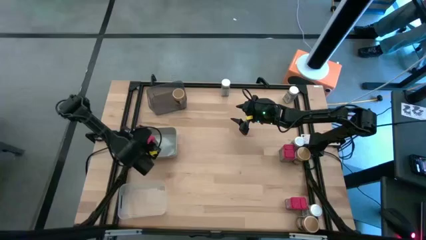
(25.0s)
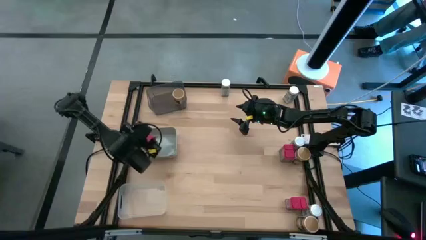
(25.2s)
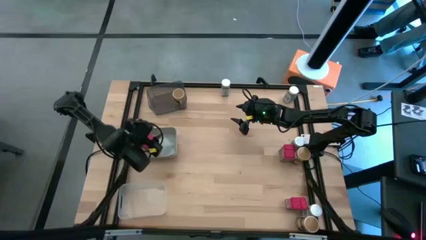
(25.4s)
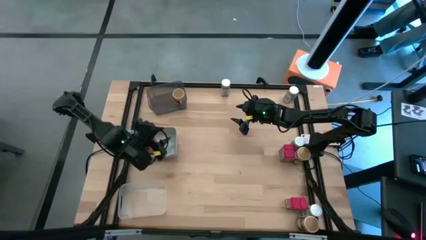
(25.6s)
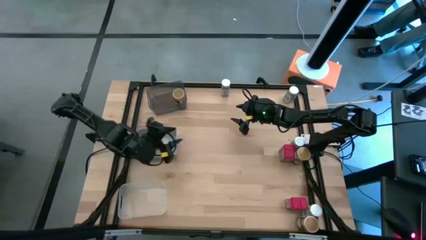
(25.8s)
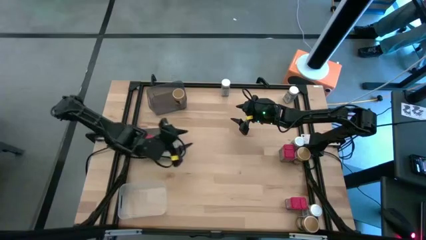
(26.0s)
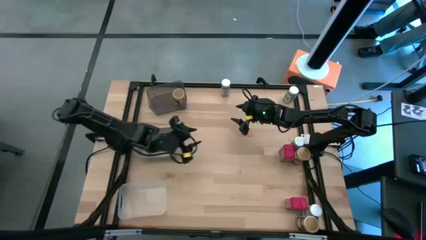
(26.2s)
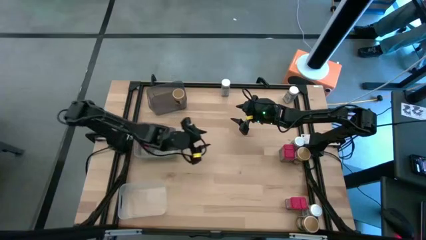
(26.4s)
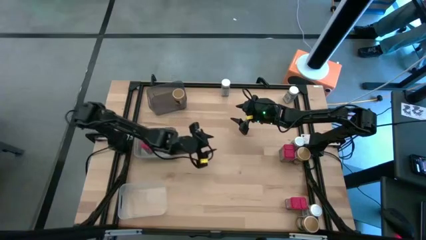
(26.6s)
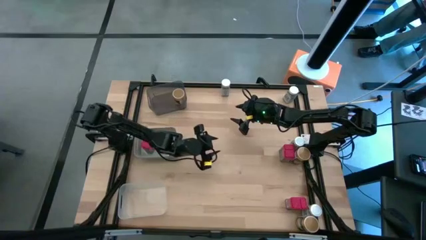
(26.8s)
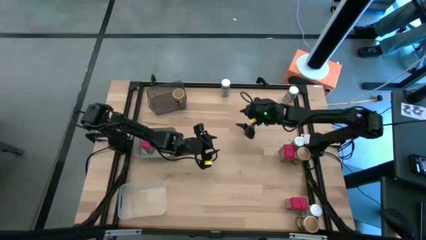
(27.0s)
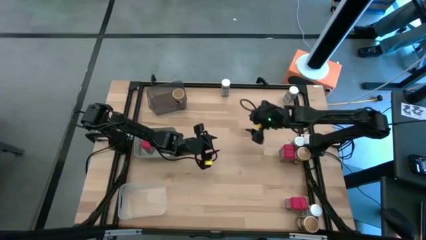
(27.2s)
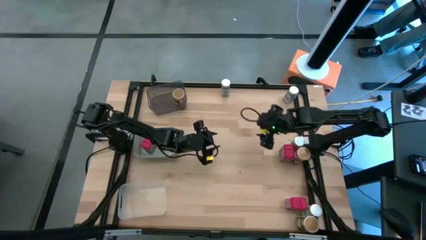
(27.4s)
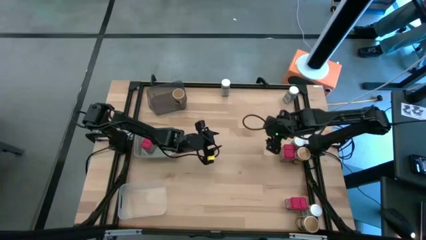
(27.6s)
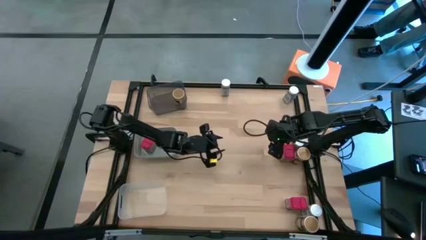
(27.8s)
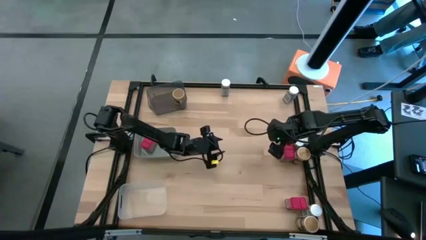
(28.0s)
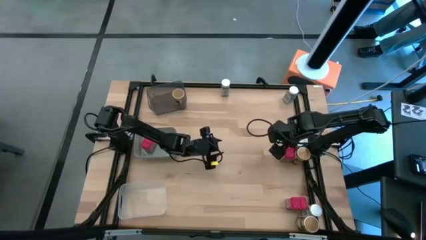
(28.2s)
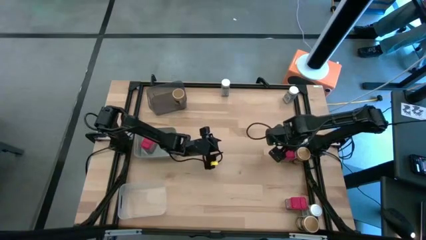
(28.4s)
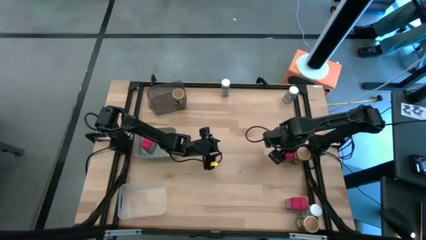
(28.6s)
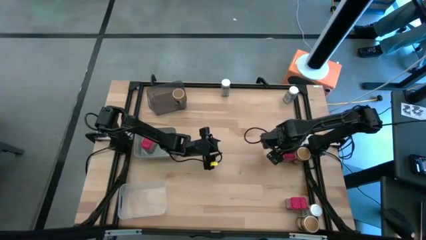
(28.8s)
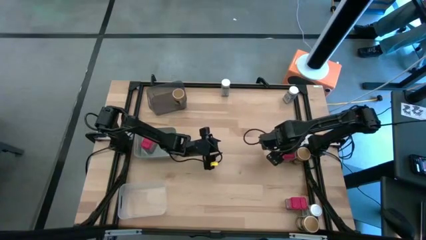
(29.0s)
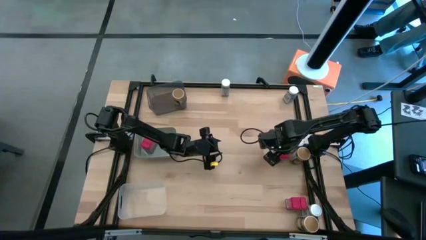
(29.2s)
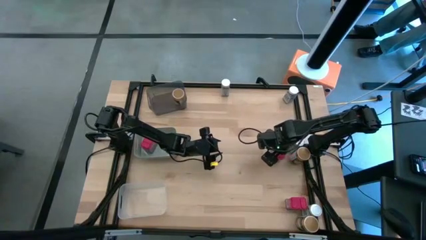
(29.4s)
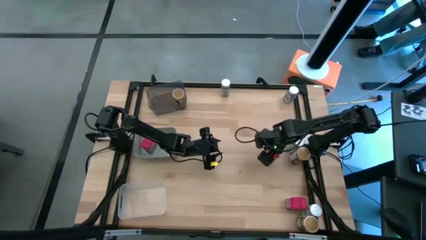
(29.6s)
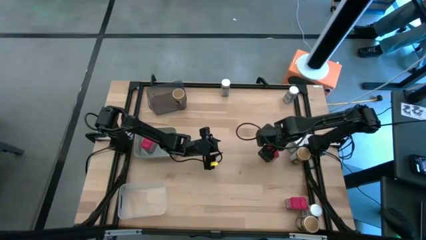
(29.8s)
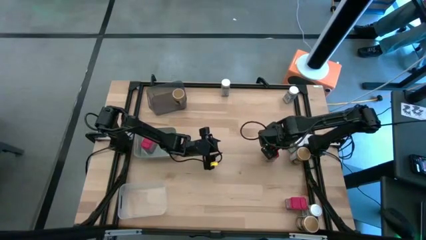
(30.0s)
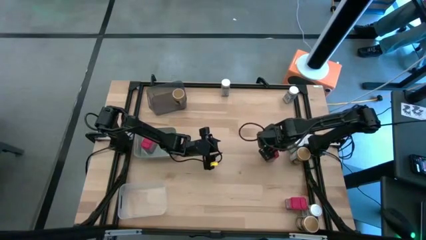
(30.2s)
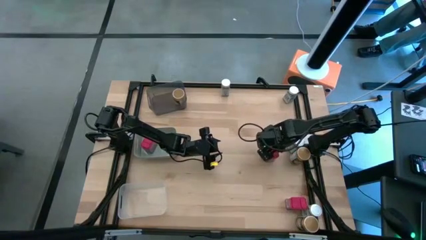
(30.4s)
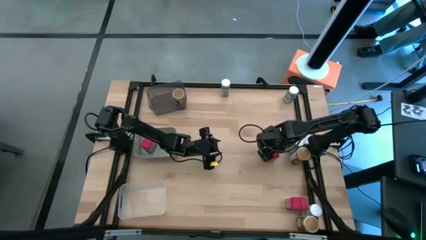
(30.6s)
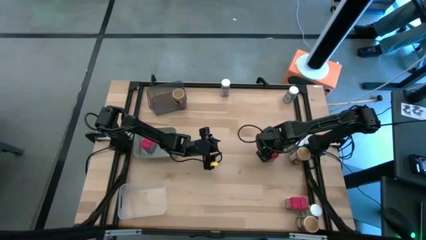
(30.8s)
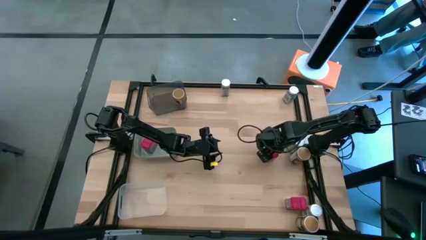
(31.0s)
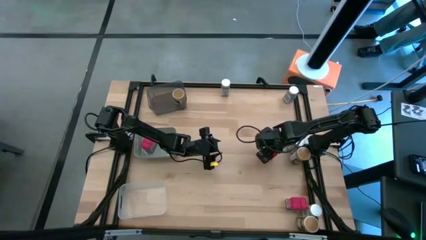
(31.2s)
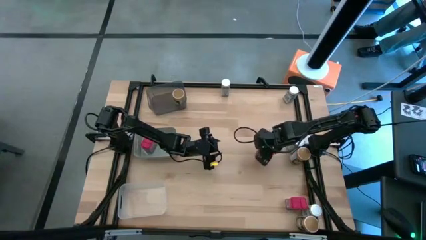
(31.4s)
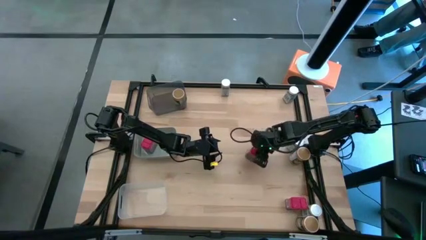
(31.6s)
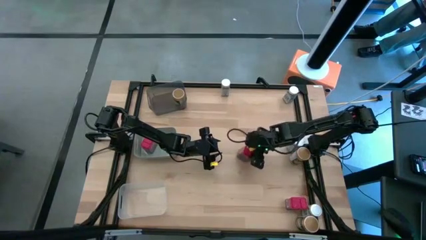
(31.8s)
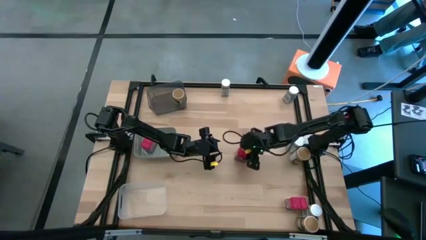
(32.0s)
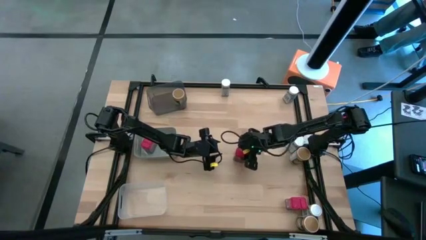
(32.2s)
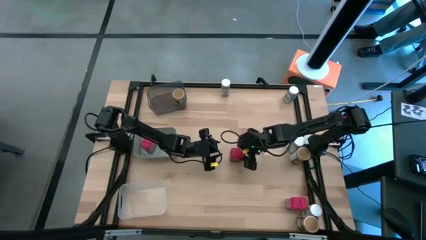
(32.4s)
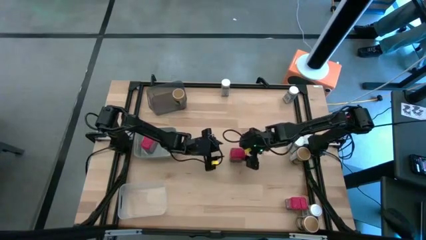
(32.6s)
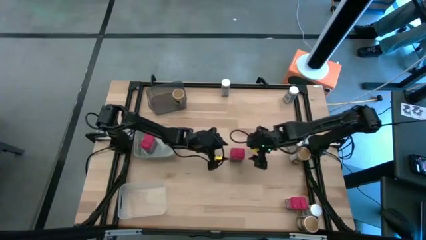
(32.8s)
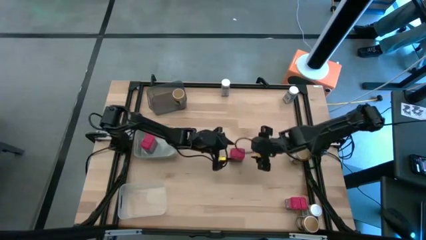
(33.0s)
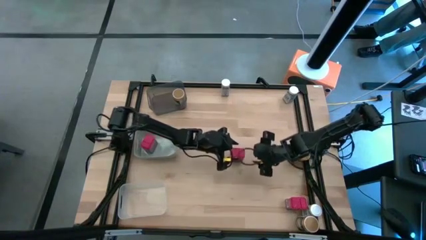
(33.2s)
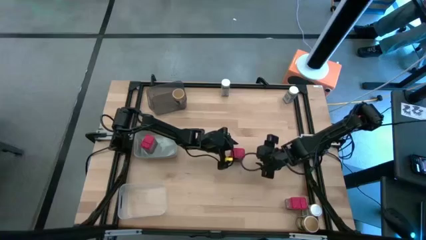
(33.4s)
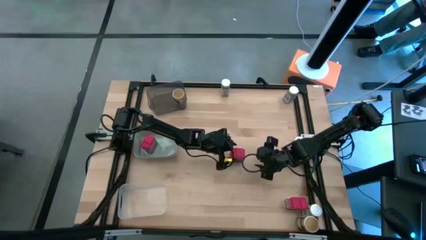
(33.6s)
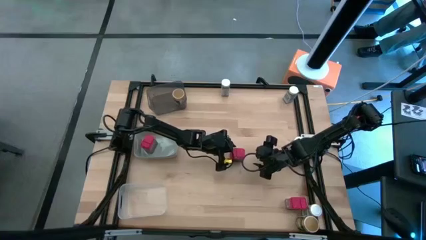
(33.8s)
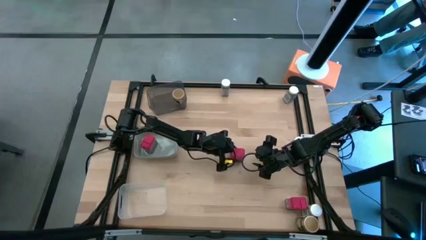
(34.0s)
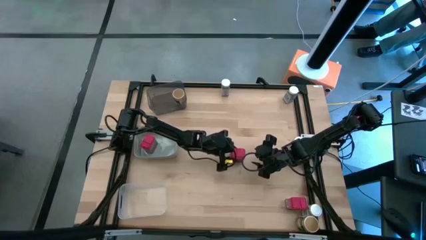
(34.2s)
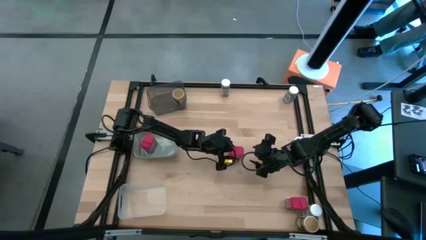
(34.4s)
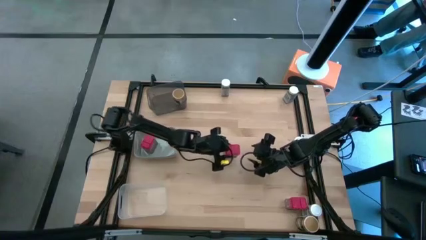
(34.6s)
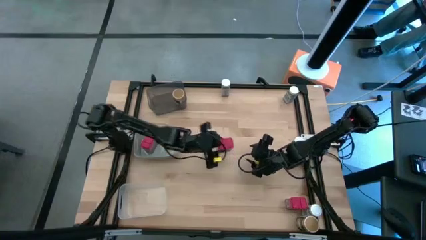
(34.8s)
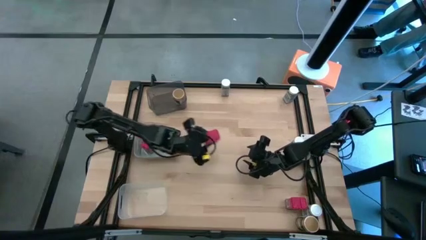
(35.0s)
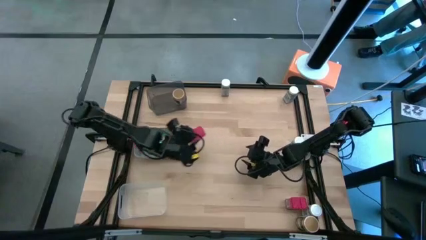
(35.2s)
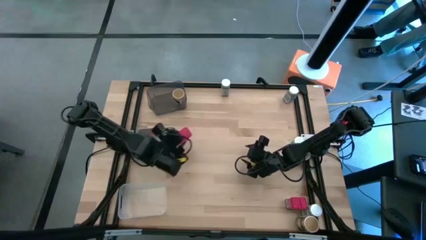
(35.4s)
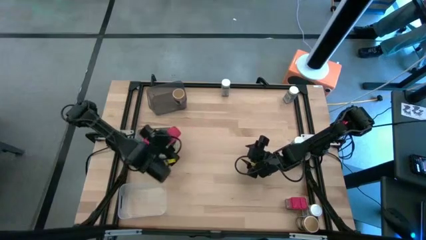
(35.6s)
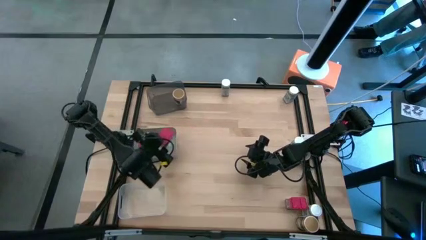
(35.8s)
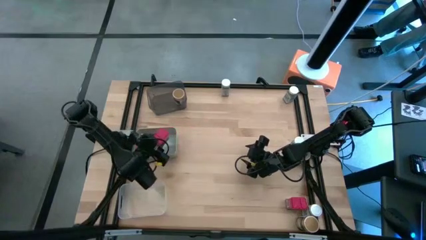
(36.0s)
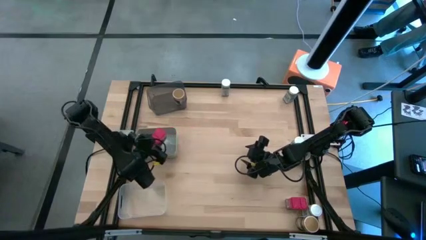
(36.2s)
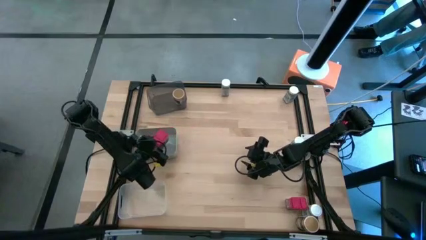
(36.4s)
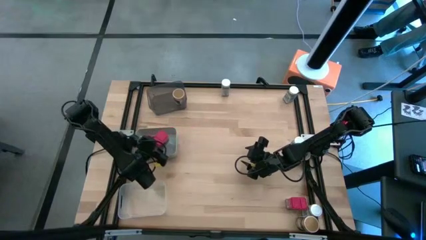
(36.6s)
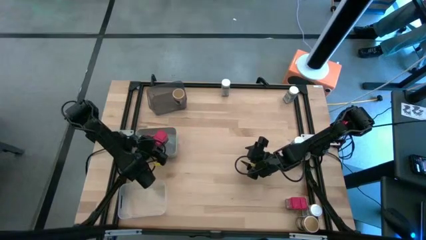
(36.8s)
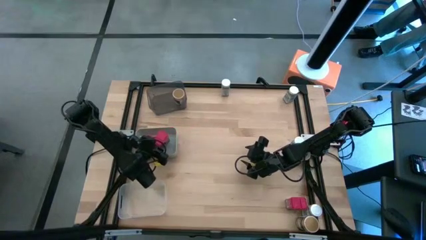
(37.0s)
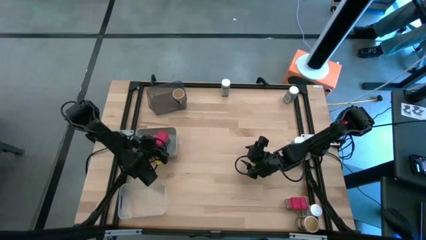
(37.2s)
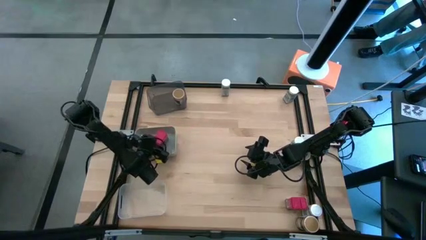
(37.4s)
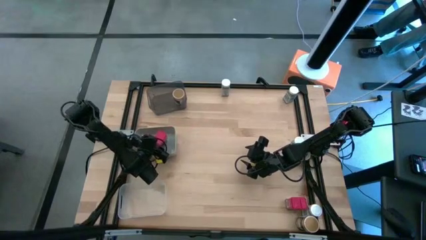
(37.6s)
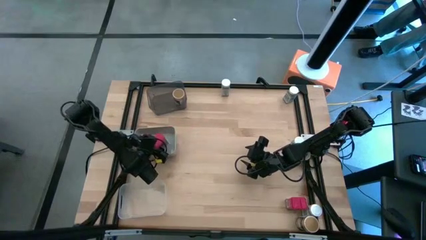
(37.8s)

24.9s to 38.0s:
Task: Sort spices by type
Put the top red seasoning can into the gray bin

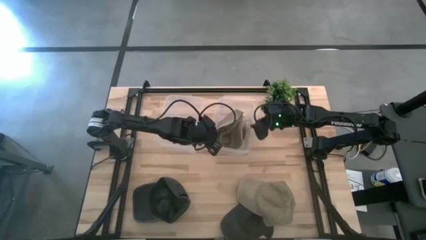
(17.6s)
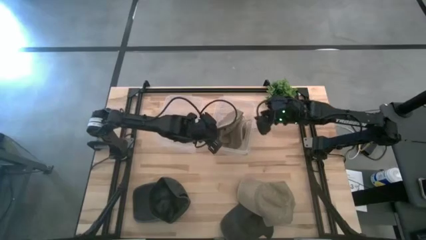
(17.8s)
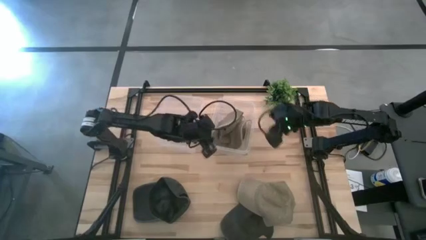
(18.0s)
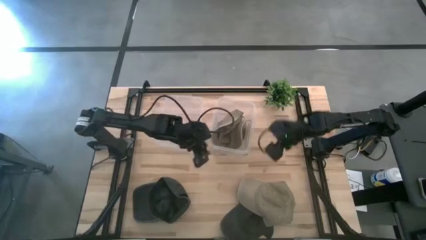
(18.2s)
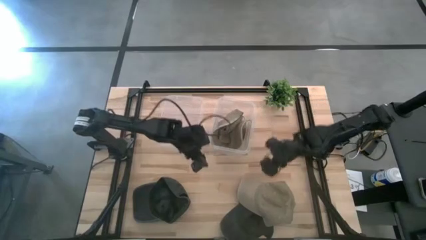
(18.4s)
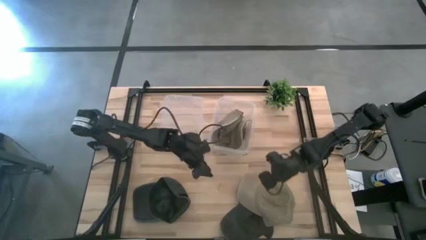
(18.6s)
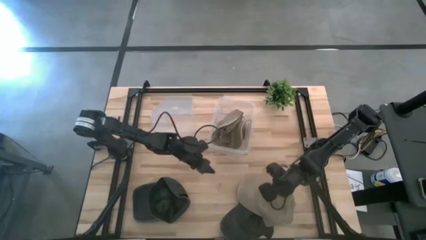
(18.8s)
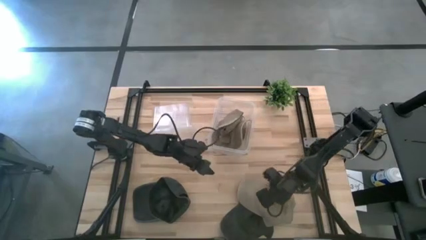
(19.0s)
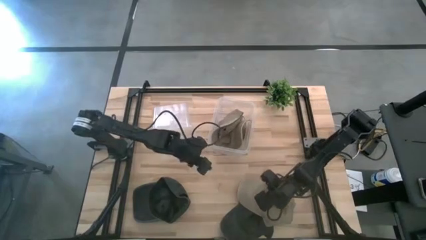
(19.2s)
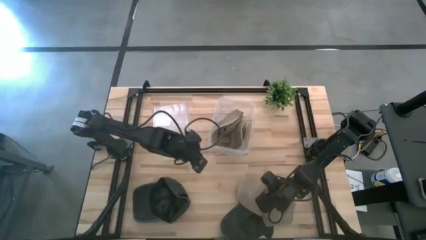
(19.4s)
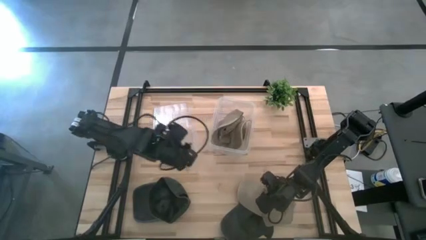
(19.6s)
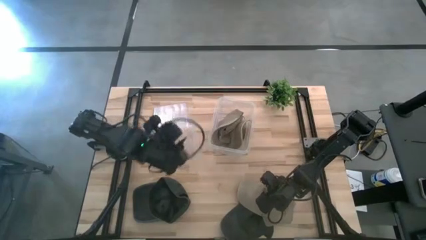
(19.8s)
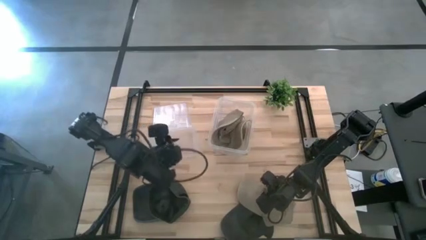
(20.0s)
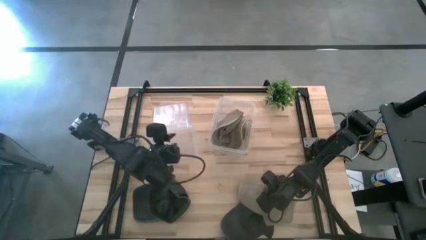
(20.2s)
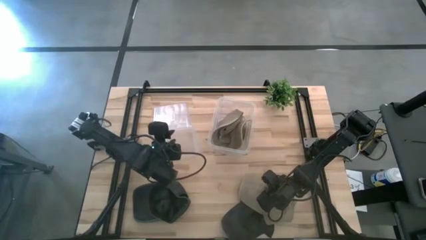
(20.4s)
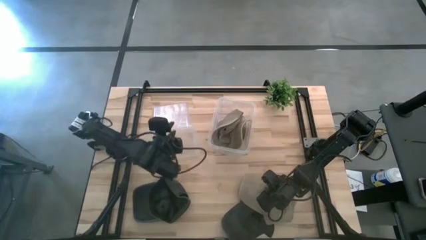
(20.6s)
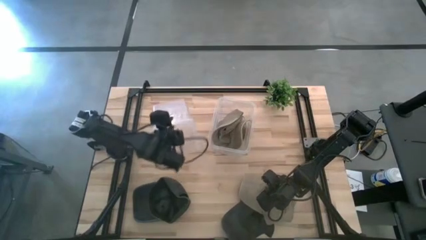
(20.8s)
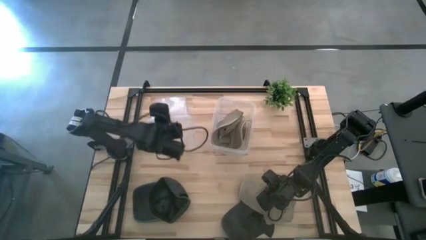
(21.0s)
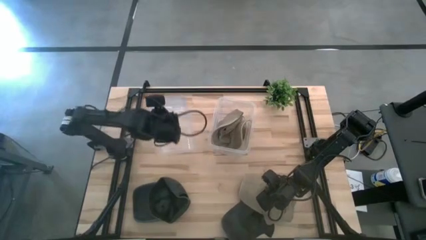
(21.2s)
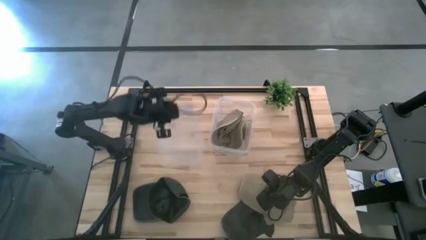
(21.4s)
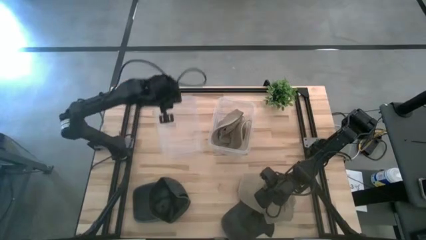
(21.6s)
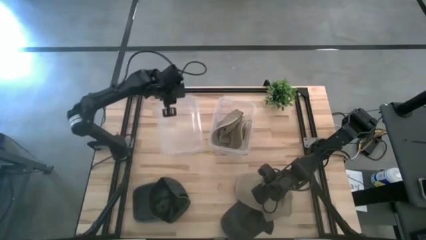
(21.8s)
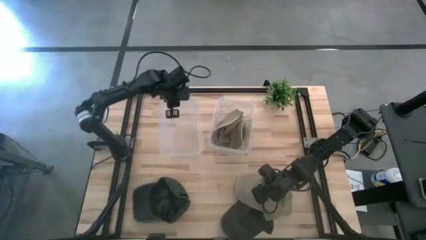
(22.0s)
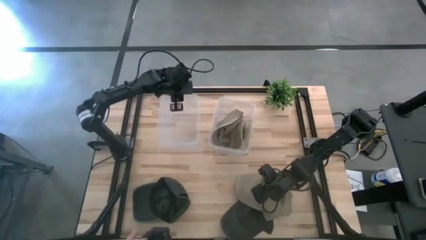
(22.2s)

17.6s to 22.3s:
Task: Pick & Place hat
Adjust the left transparent bin on the table
